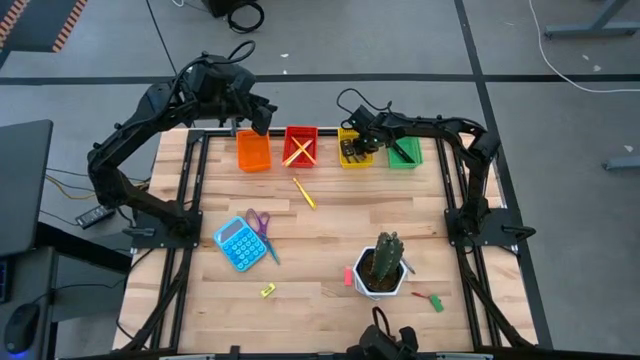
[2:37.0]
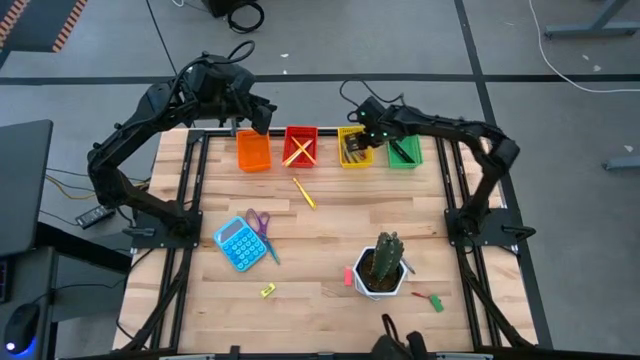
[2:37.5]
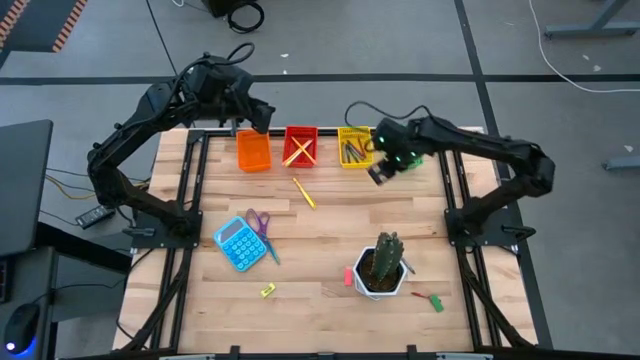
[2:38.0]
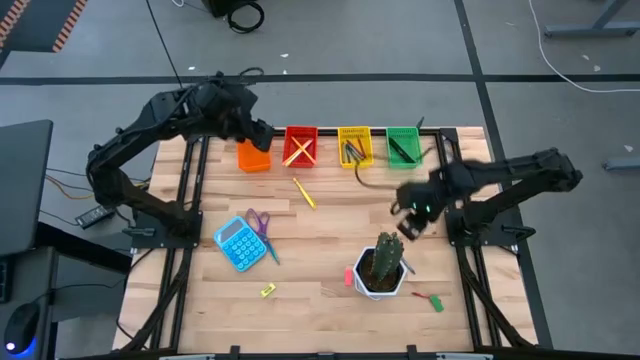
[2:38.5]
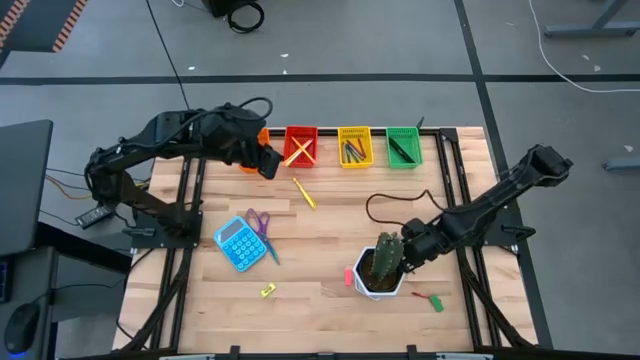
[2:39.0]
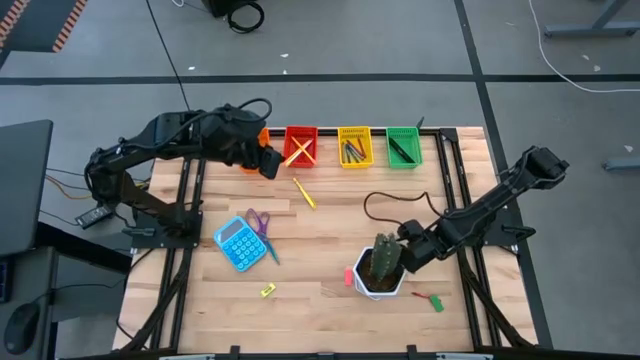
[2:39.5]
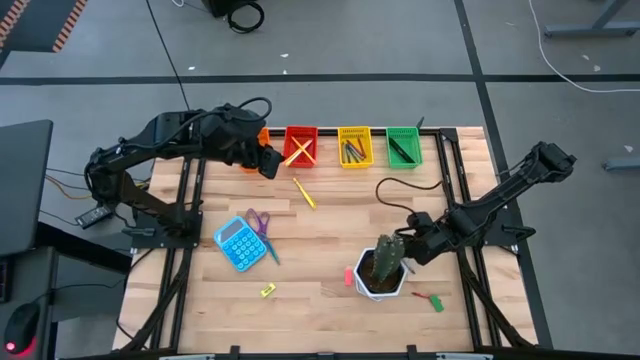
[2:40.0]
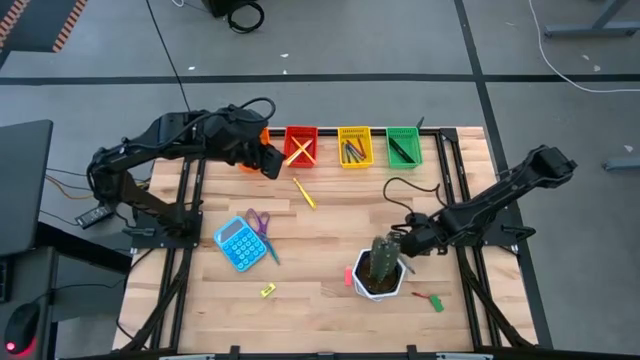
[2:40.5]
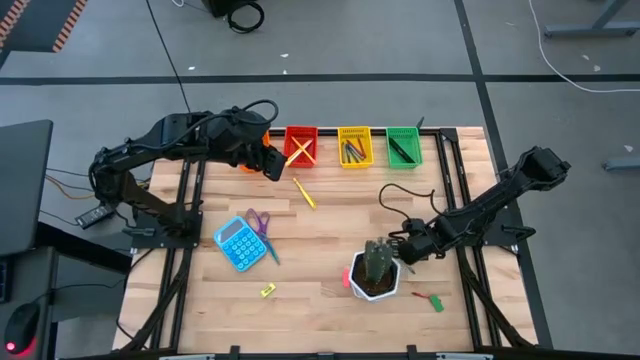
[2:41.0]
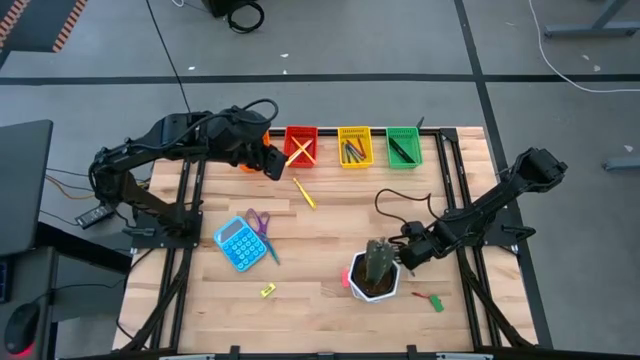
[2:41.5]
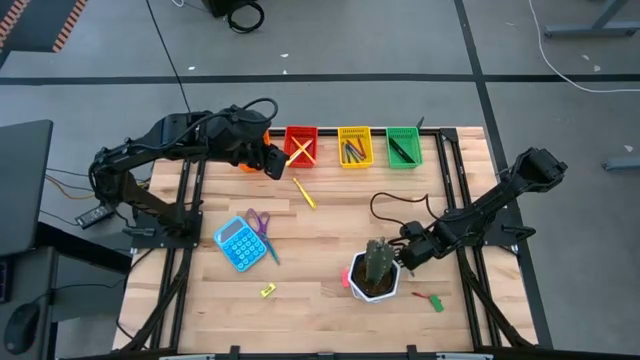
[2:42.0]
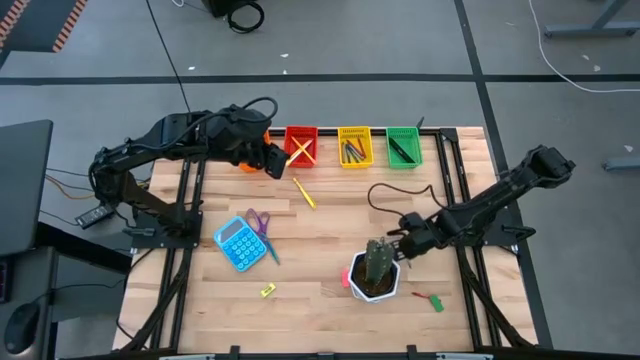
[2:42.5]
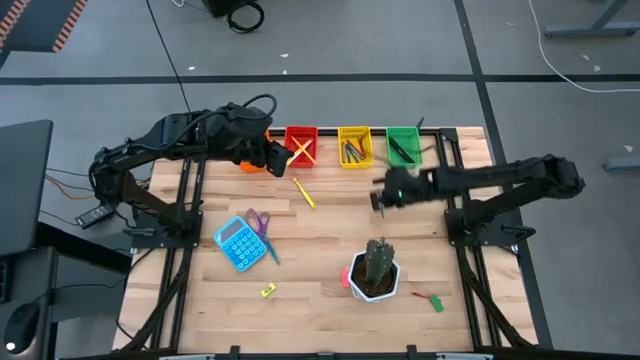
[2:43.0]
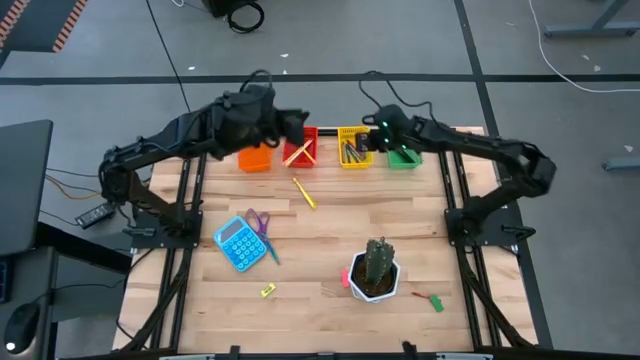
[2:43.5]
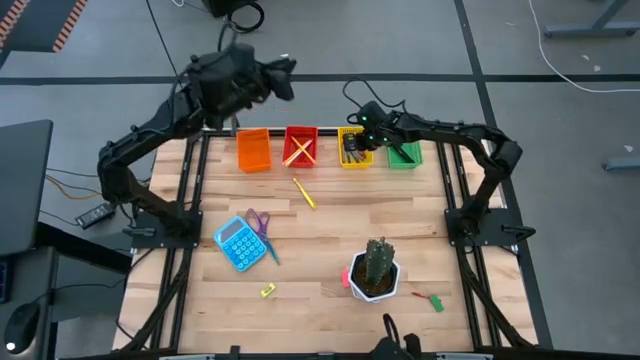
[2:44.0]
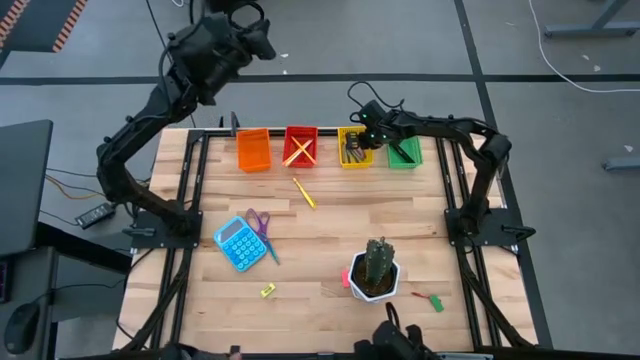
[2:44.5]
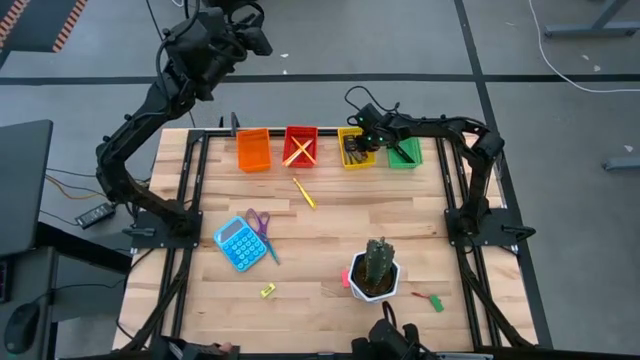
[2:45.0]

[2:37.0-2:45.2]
Task: Sort crayons/erasers/pens/pencils in bins
Put the gray crayon into the yellow bin

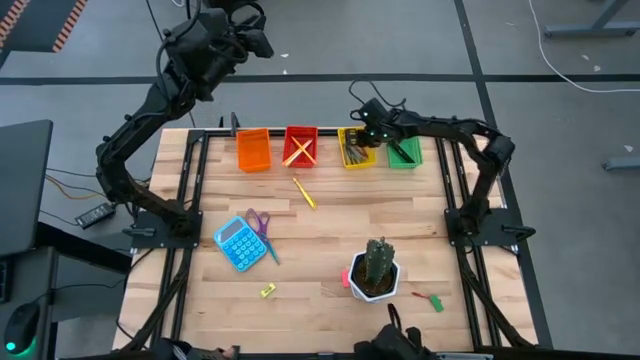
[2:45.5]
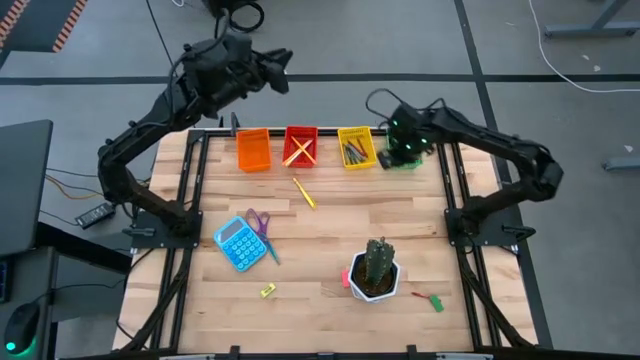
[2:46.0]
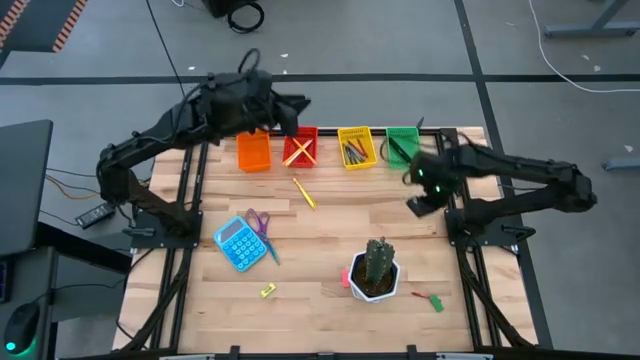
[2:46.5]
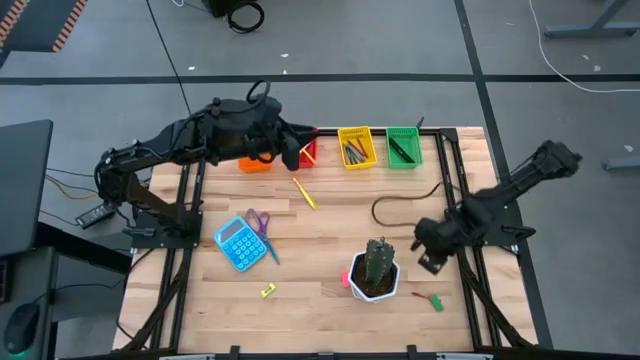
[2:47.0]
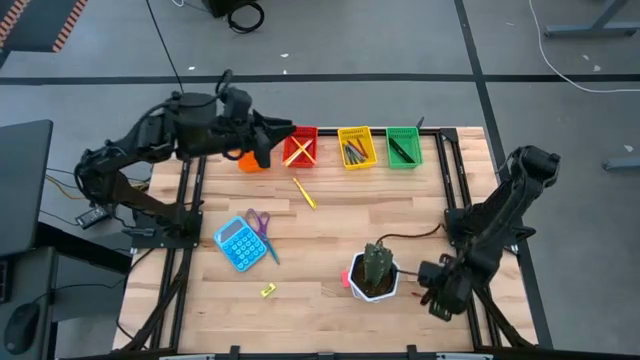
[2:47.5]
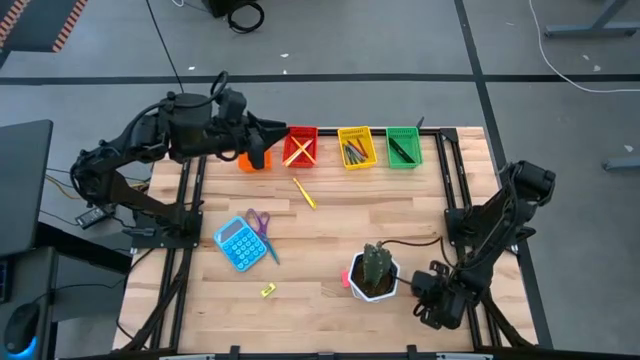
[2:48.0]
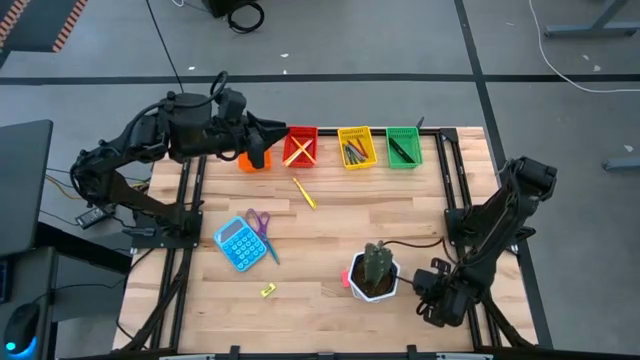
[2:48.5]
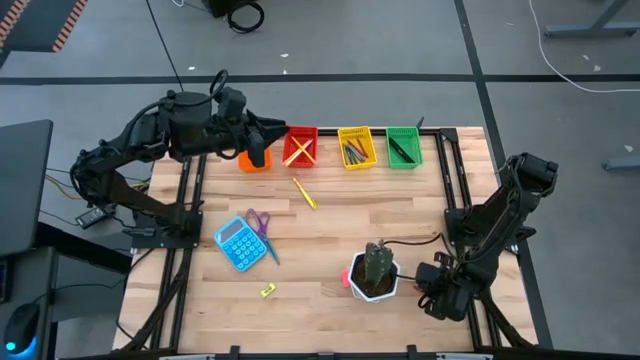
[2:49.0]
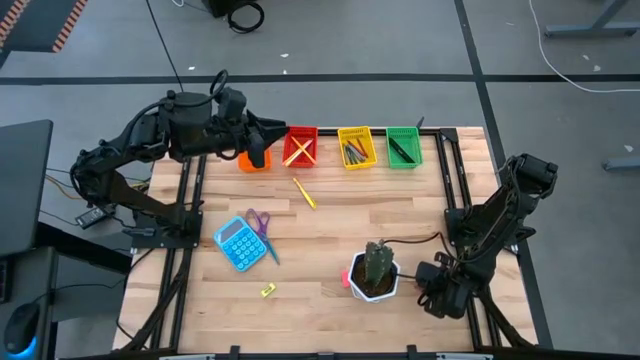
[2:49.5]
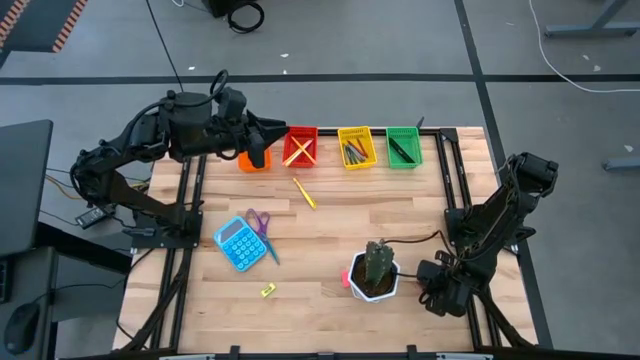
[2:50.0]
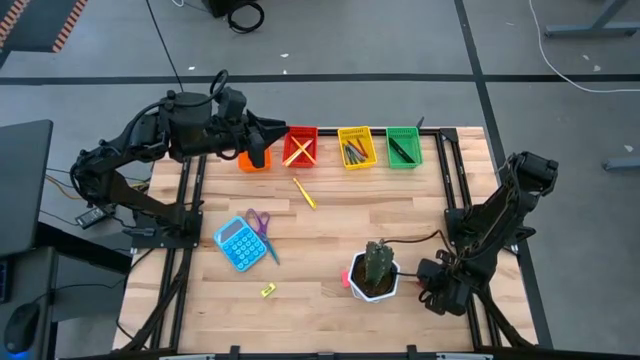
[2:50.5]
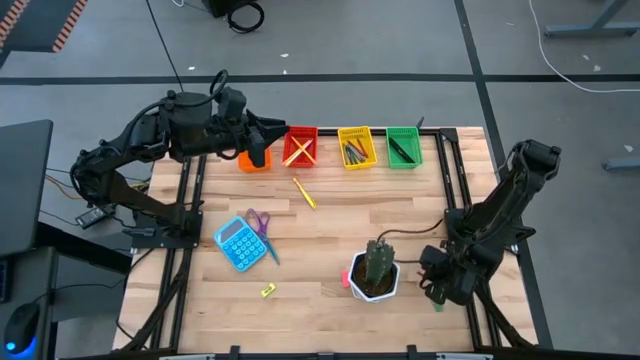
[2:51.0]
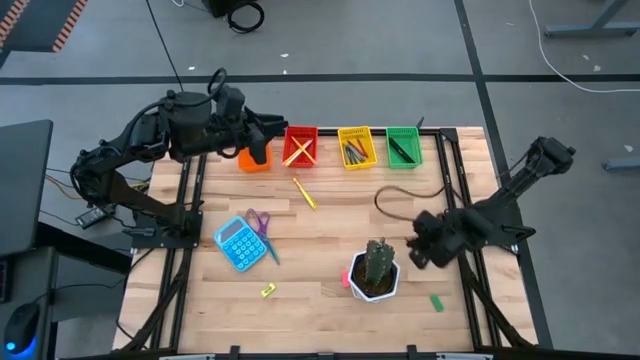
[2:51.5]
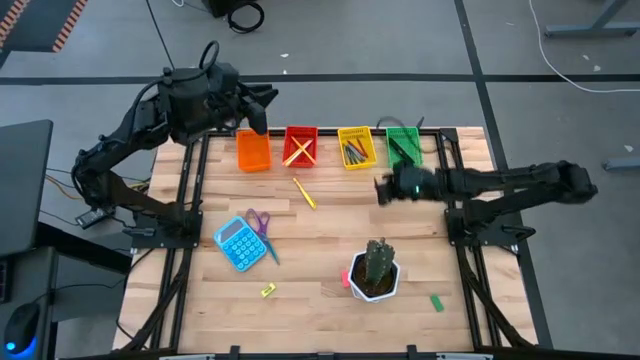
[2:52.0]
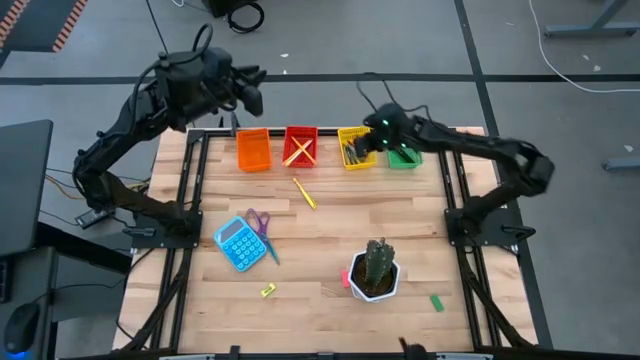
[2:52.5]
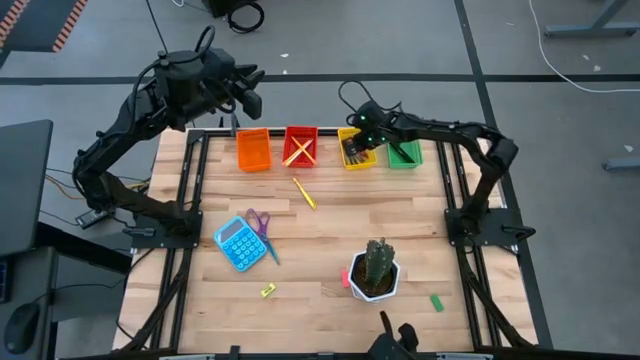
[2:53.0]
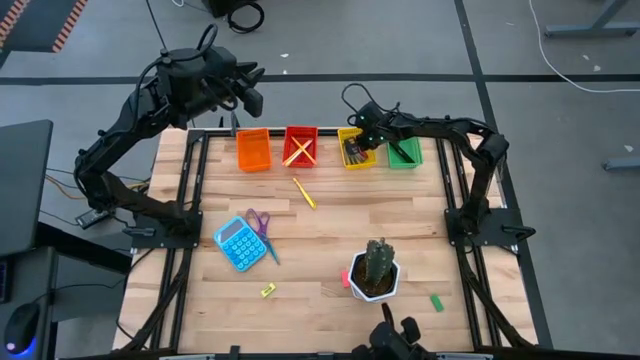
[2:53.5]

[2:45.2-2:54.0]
Put the red crayon into the yellow bin

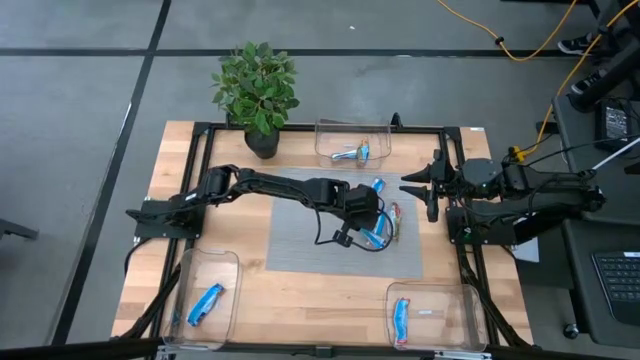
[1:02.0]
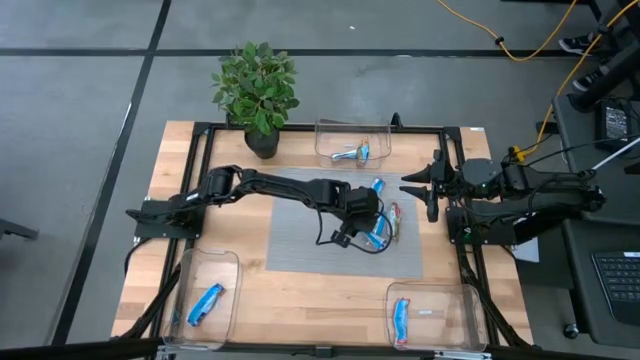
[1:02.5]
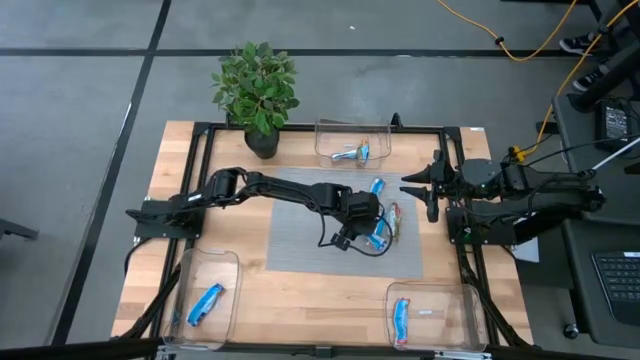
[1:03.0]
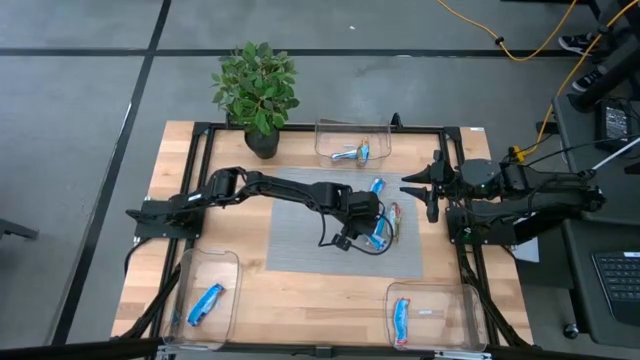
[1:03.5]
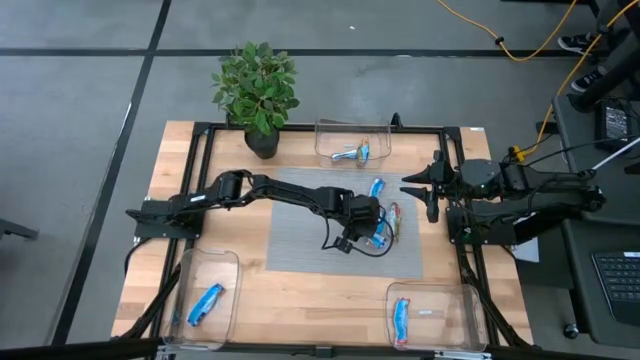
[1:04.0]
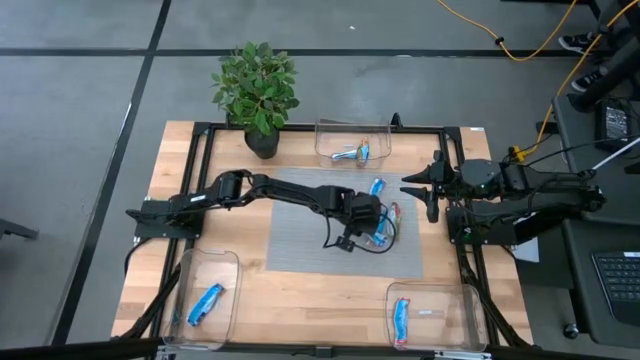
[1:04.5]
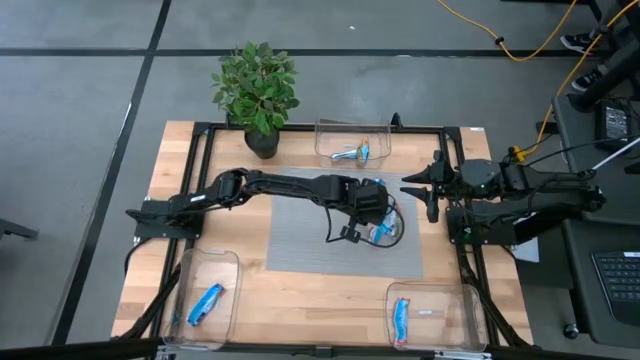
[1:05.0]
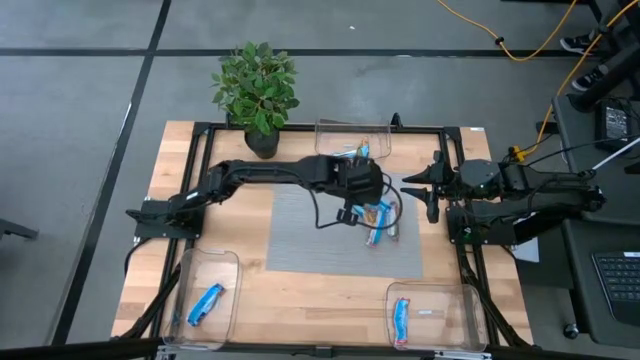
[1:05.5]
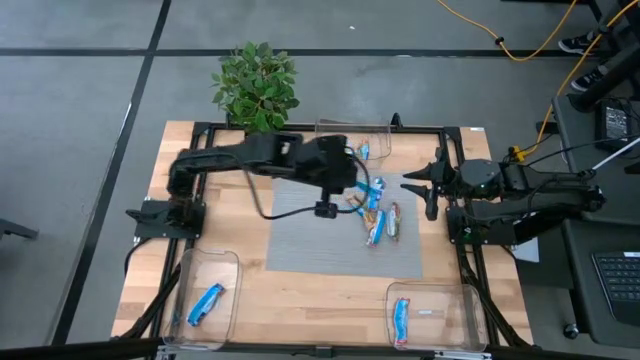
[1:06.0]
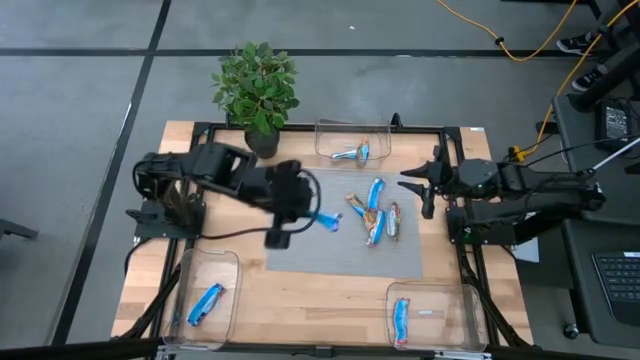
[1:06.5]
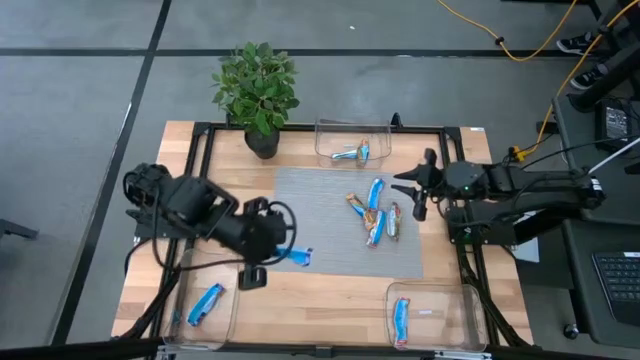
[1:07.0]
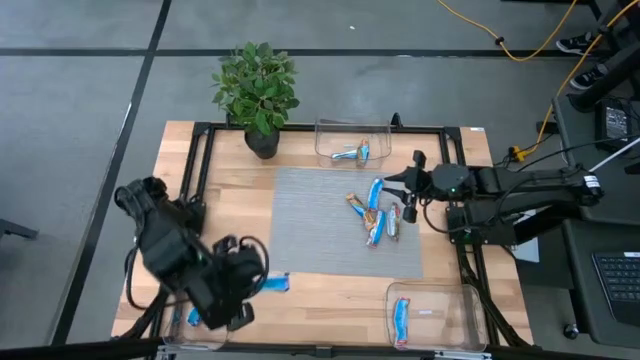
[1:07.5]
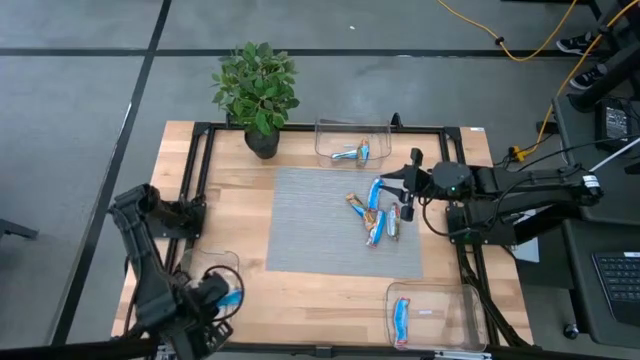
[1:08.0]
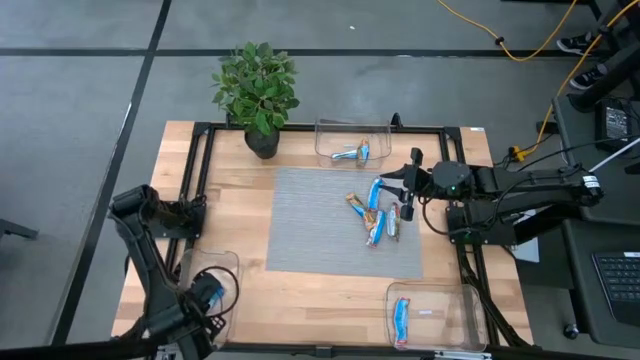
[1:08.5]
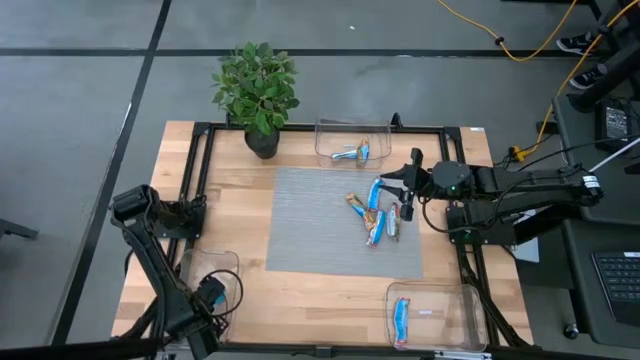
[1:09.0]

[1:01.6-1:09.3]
Task: Pick and place Granola Bars by type
Put the blue granola bar into the bottom left transparent bin
